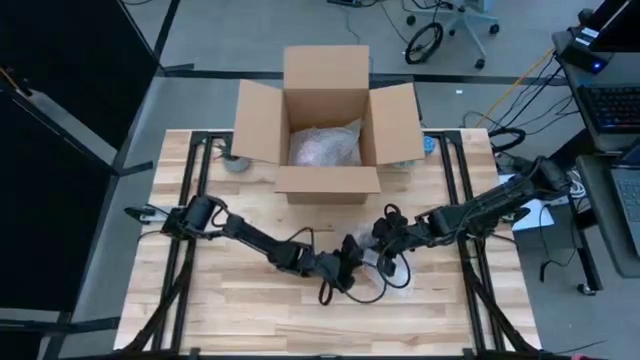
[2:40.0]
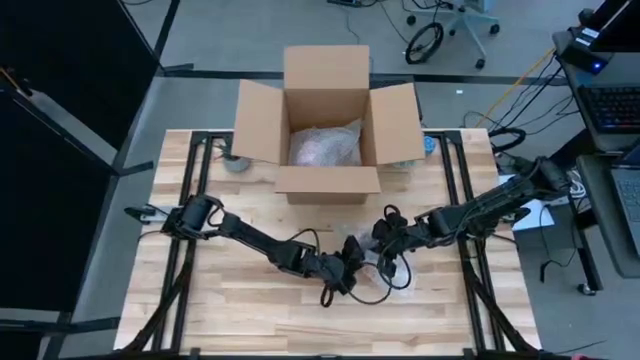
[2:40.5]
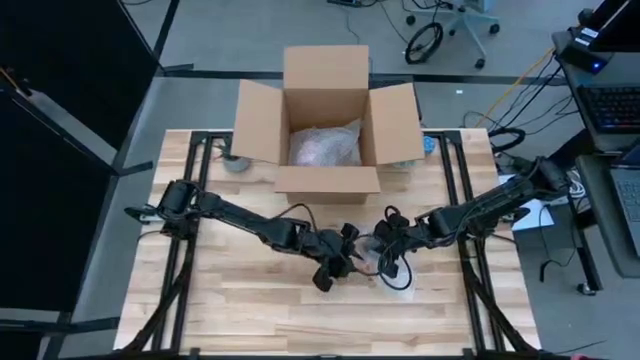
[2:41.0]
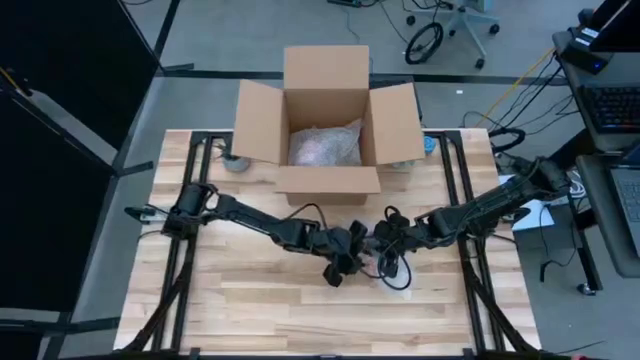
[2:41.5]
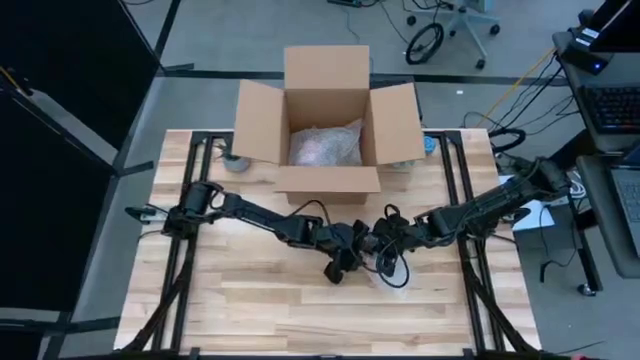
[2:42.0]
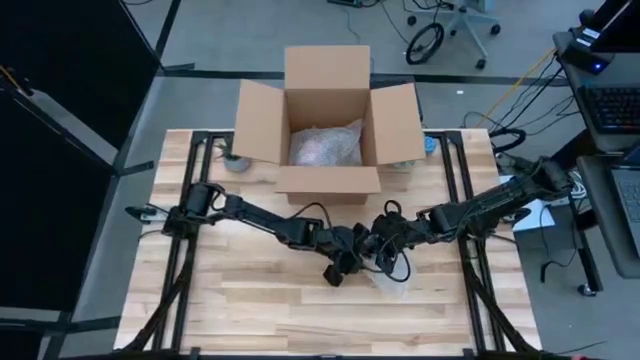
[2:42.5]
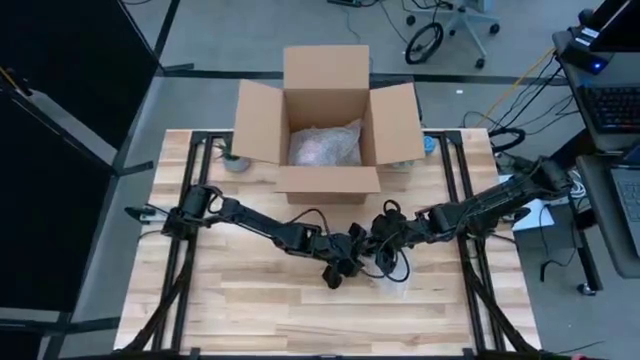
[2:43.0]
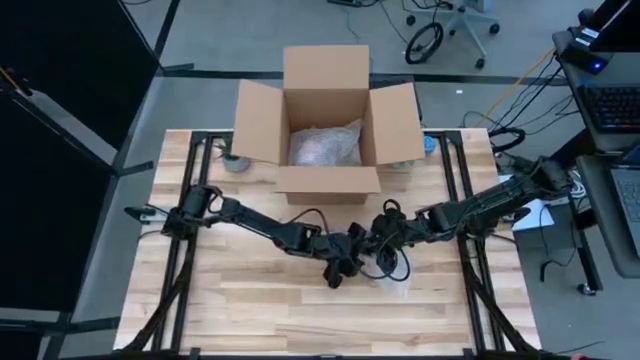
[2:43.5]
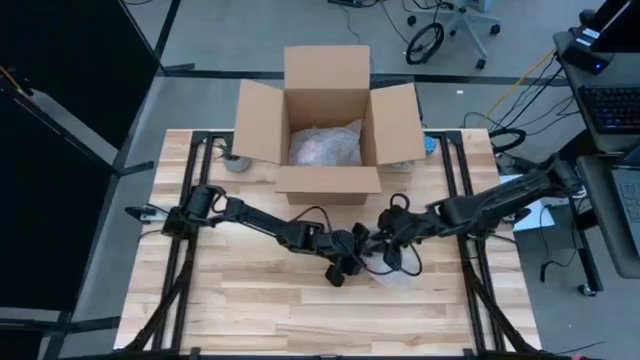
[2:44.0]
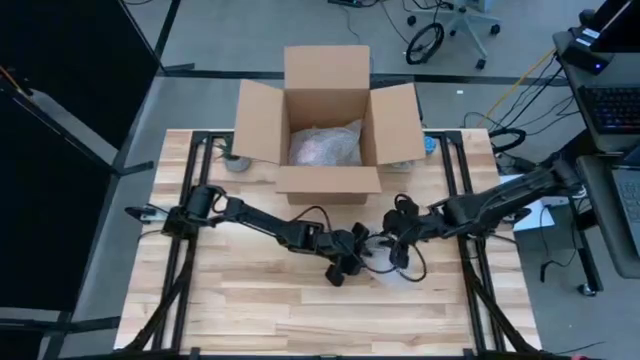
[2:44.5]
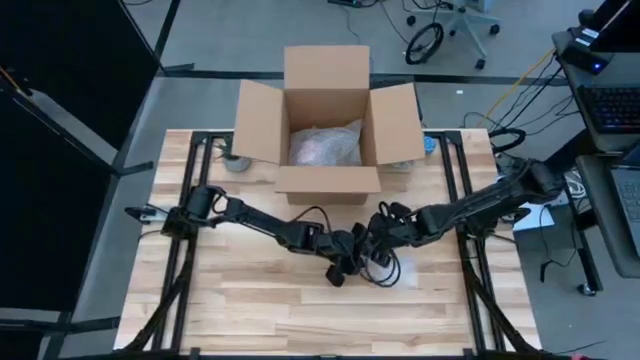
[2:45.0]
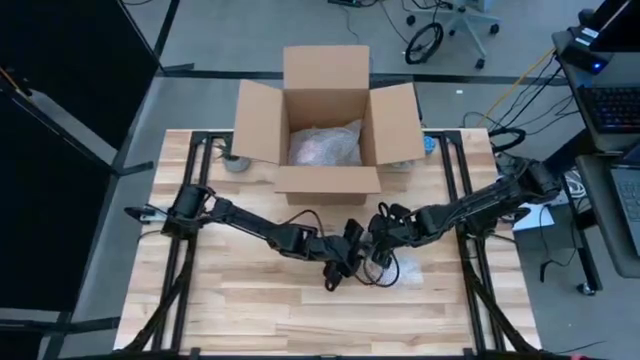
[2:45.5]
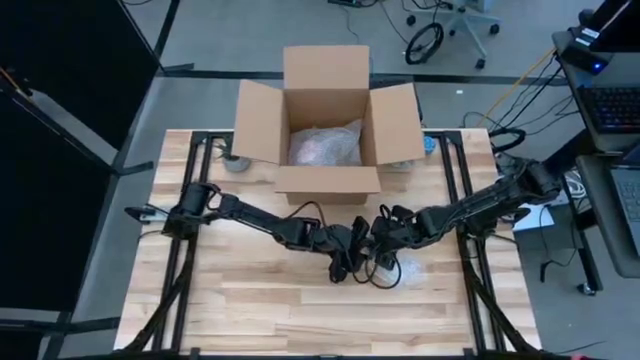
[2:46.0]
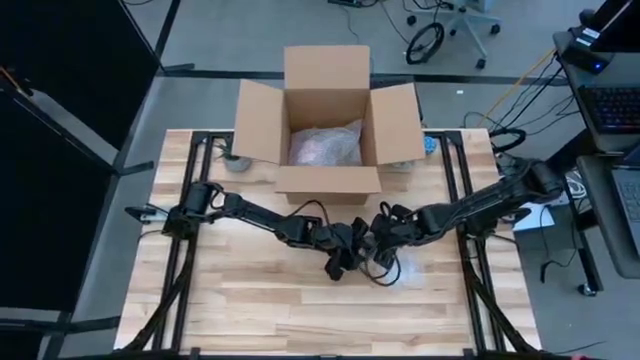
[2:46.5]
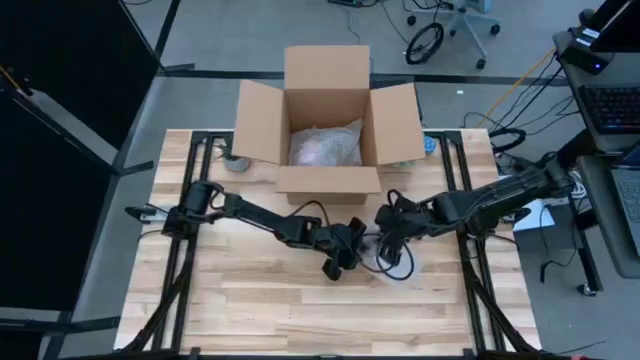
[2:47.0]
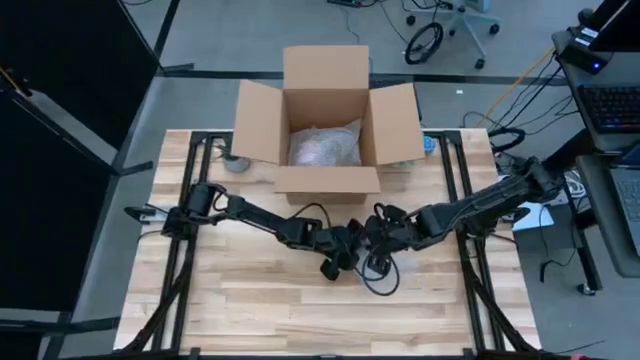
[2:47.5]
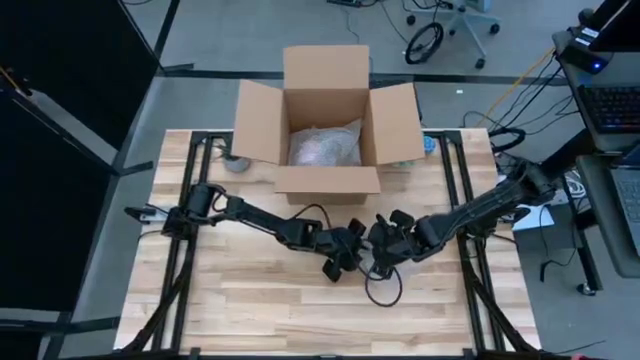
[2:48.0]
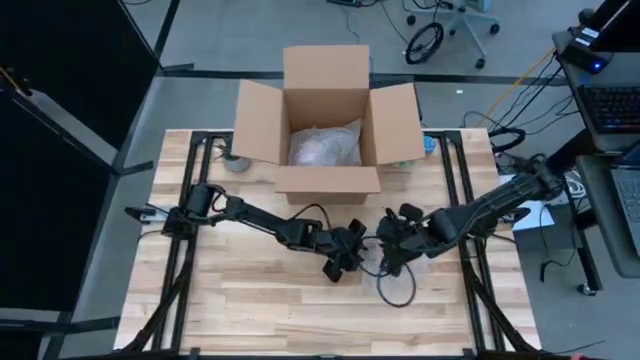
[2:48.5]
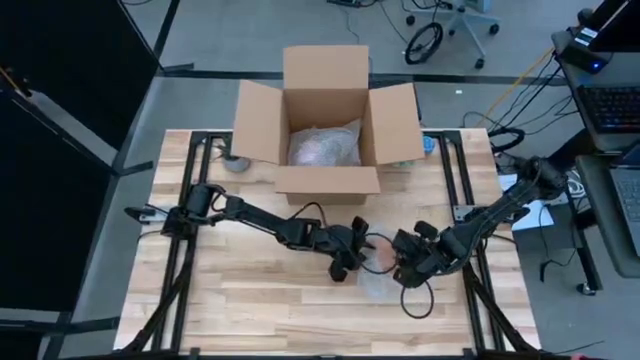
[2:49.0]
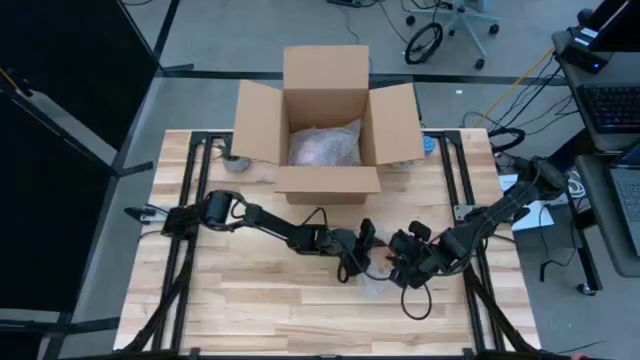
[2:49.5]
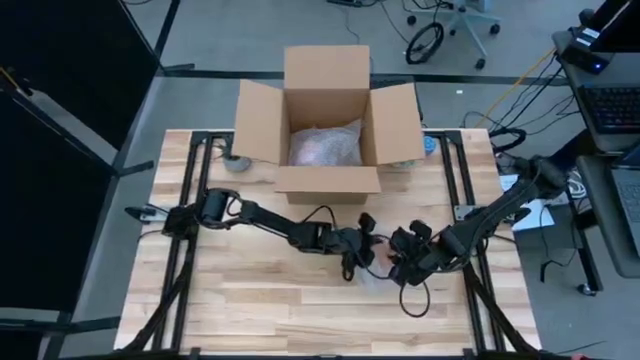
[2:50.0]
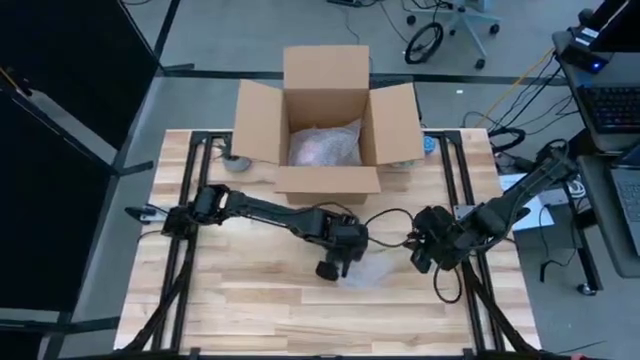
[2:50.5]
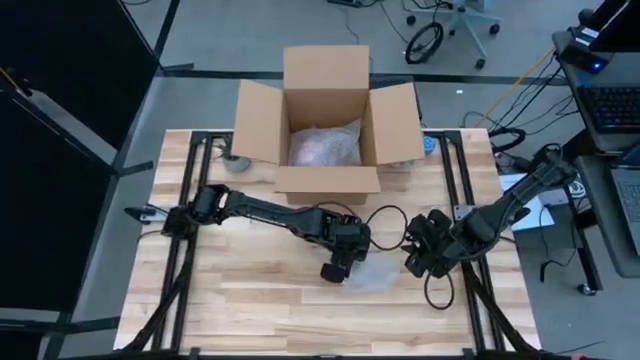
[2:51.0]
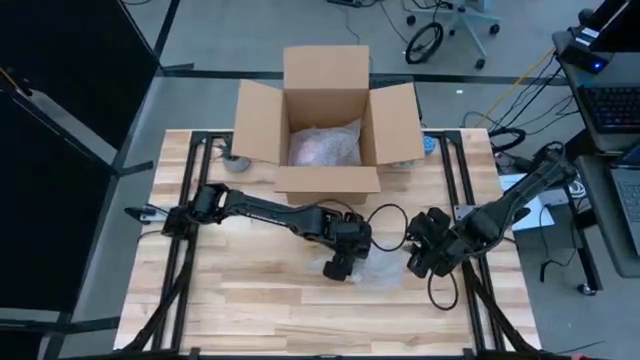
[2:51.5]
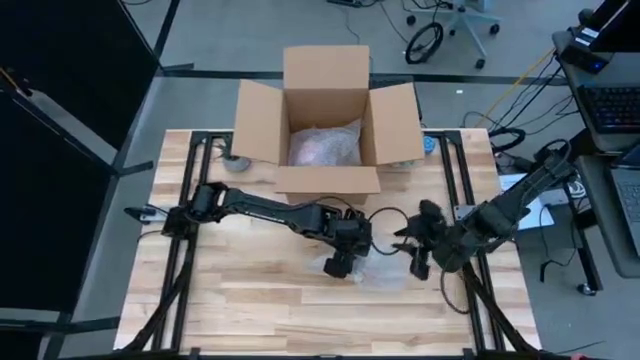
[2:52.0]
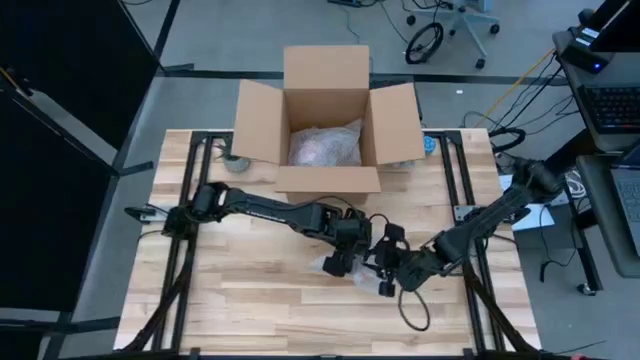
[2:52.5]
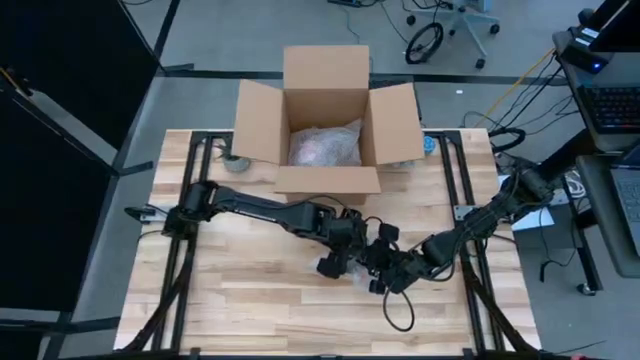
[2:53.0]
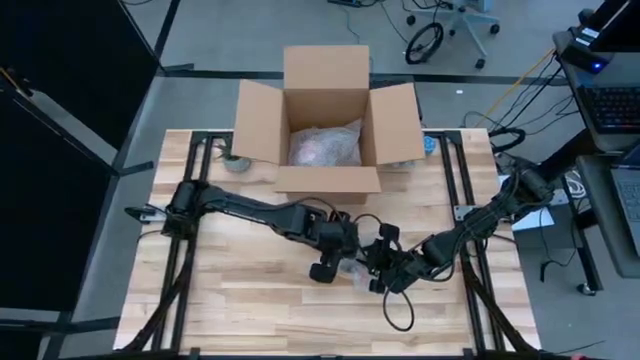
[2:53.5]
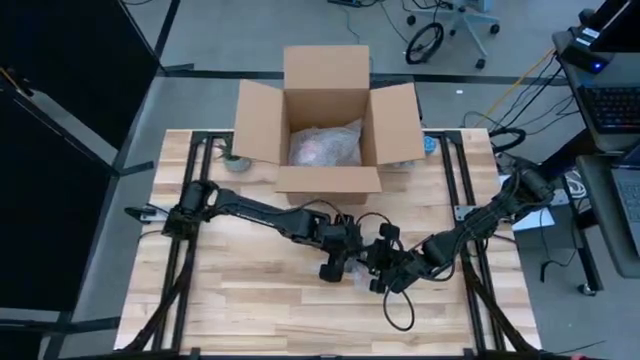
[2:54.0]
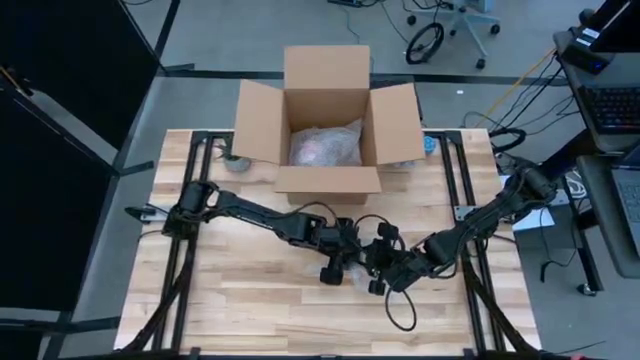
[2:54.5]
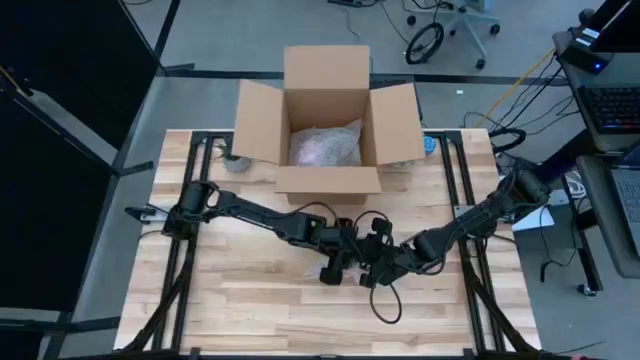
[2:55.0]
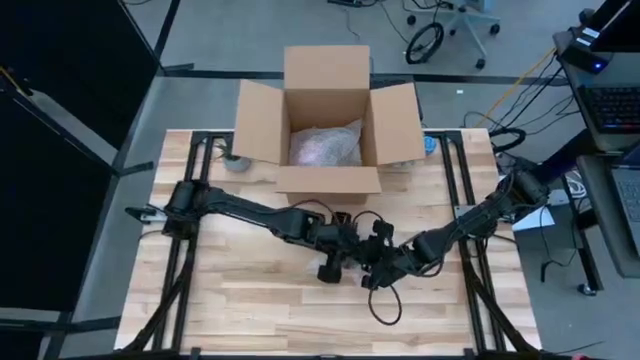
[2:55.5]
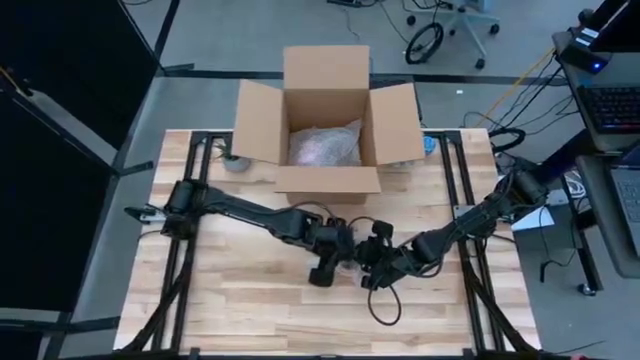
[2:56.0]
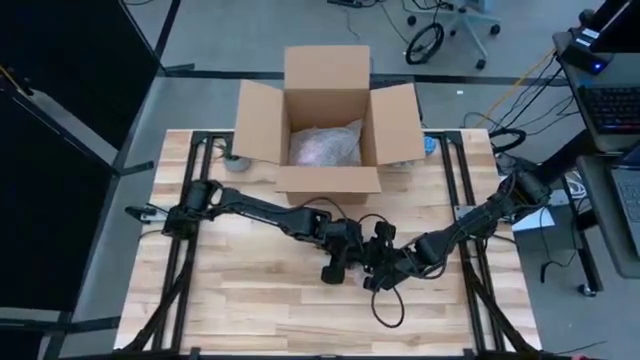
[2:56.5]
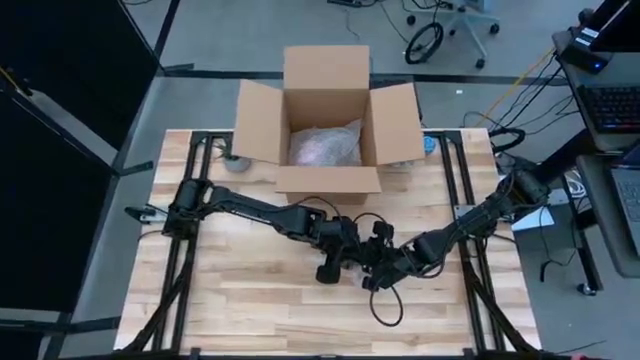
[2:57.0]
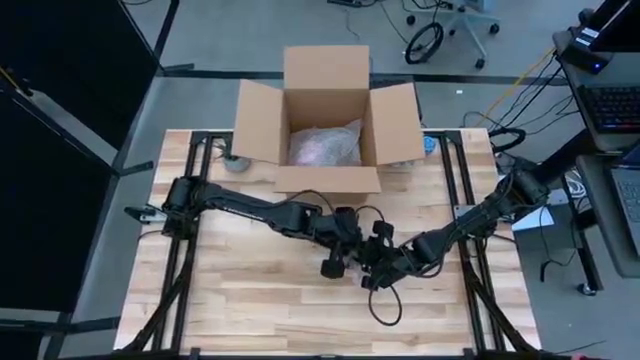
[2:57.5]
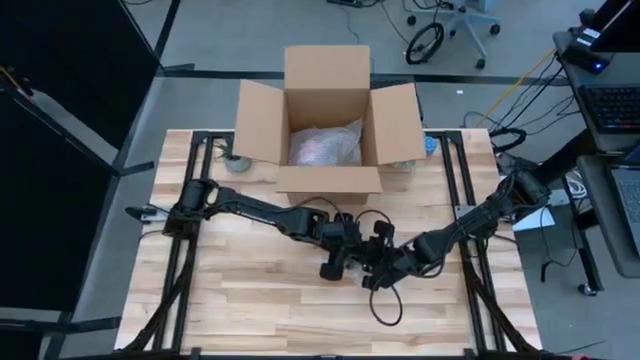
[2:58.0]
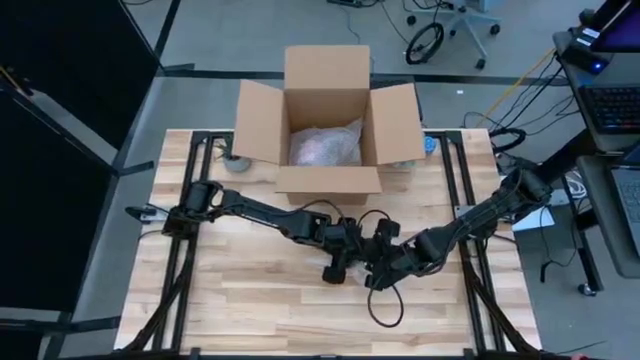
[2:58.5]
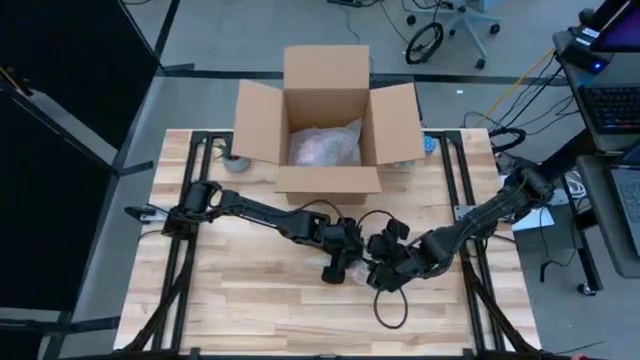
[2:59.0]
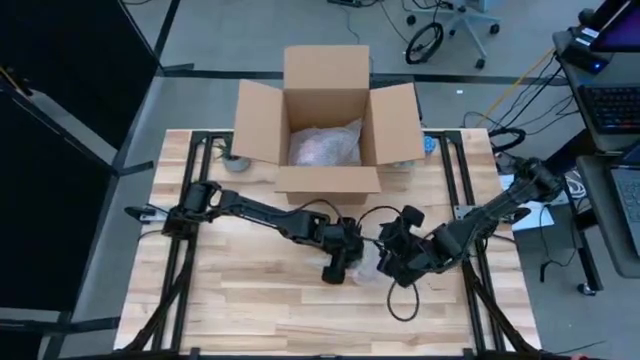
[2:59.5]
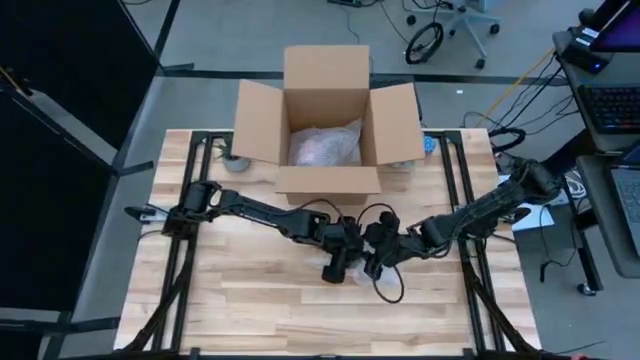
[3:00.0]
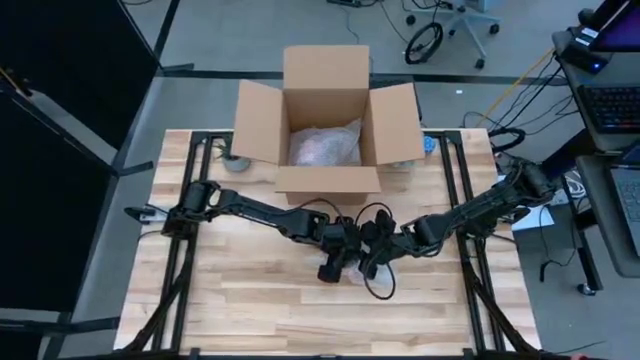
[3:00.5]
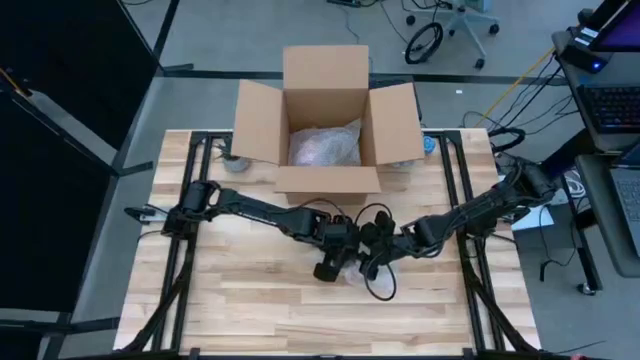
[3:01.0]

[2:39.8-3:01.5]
Task: wrap mug
Wrap the orange mug with transparent bubble wrap
